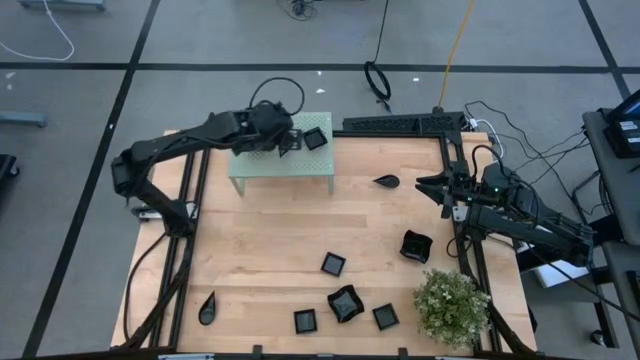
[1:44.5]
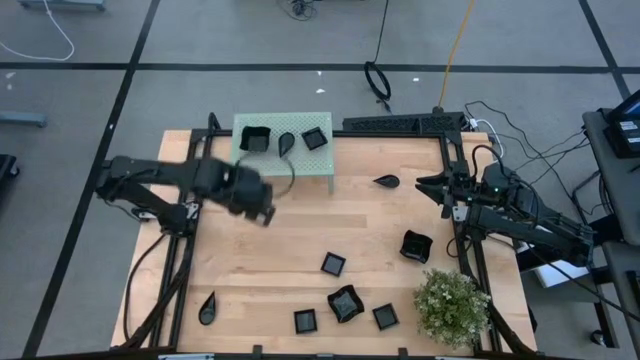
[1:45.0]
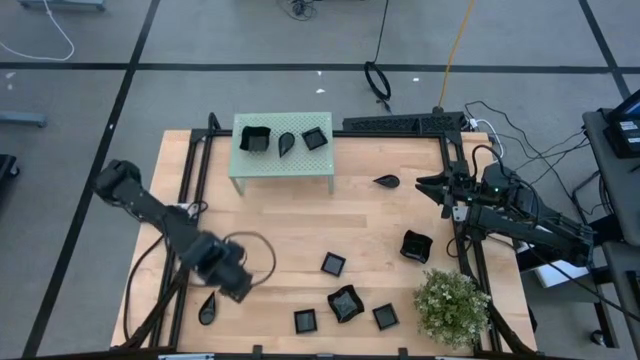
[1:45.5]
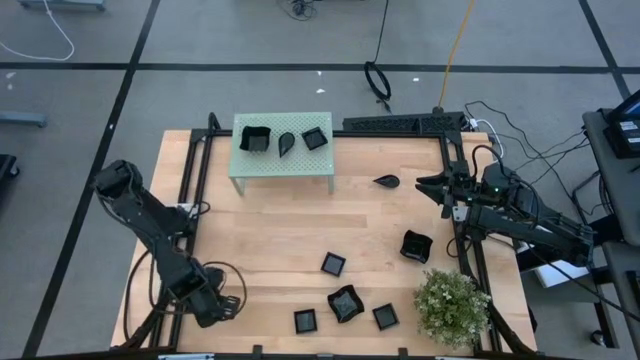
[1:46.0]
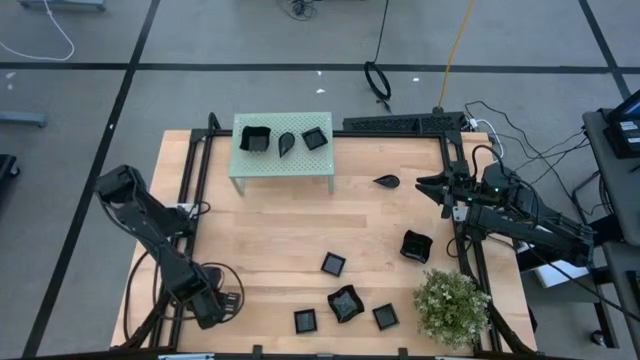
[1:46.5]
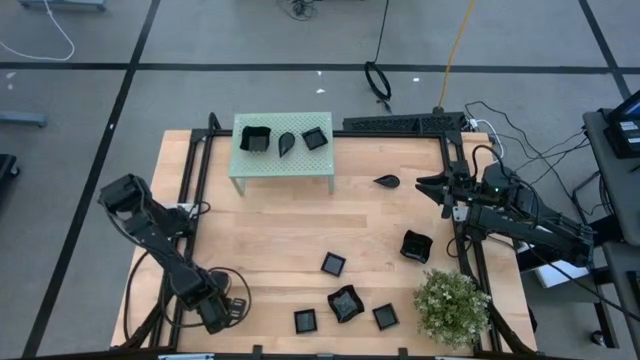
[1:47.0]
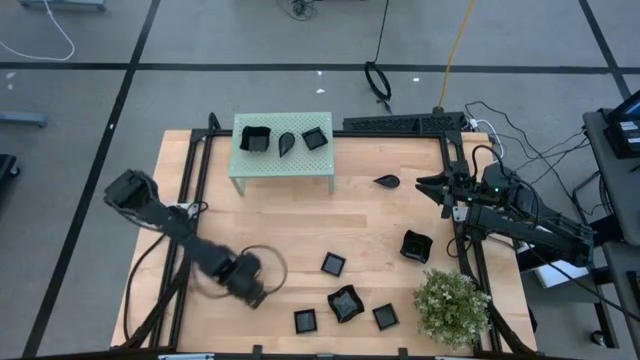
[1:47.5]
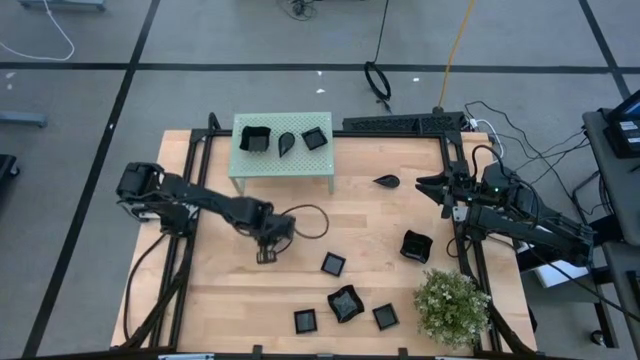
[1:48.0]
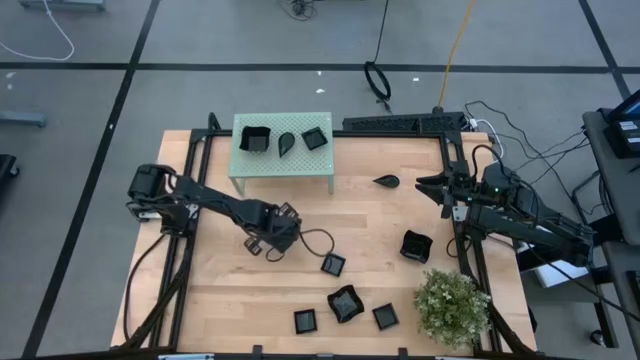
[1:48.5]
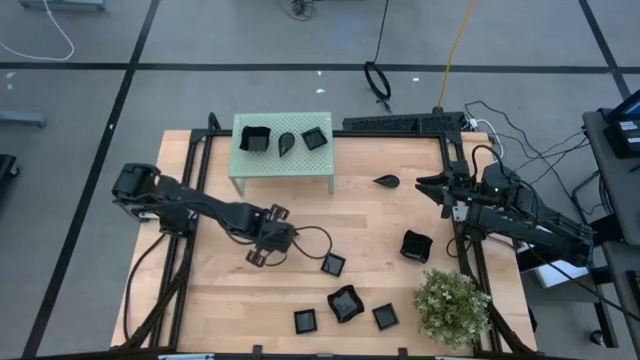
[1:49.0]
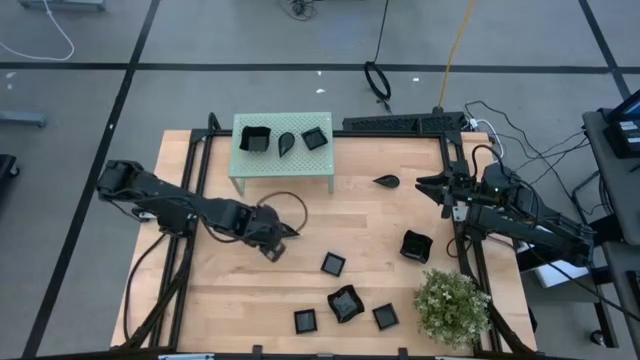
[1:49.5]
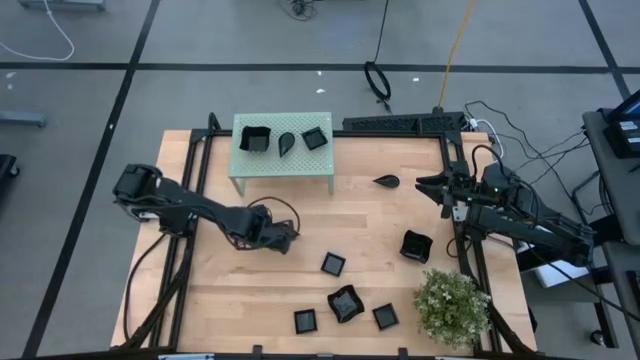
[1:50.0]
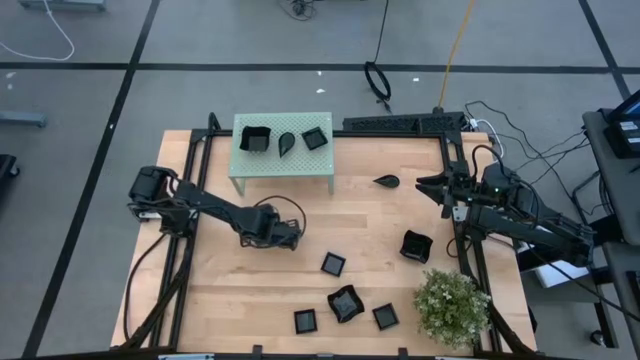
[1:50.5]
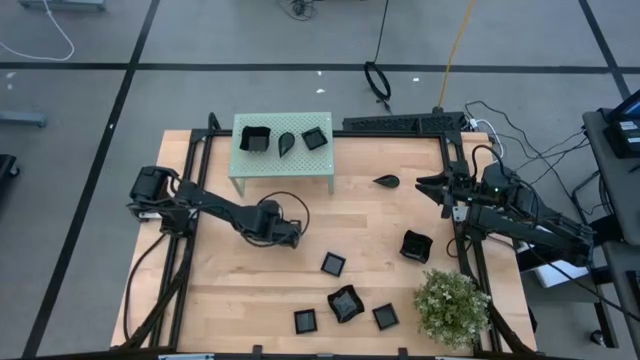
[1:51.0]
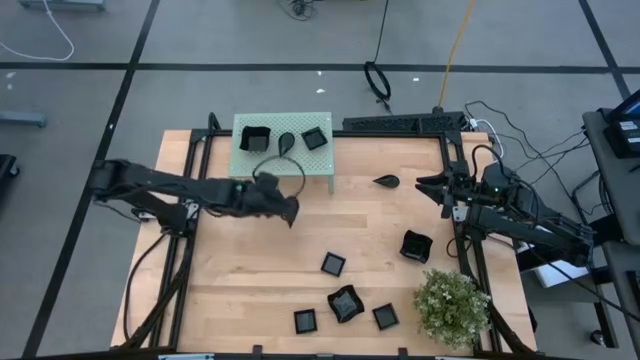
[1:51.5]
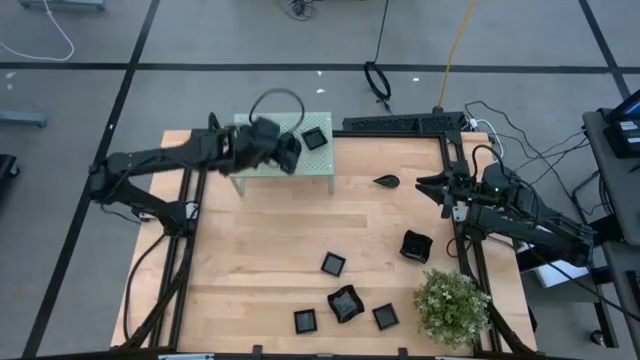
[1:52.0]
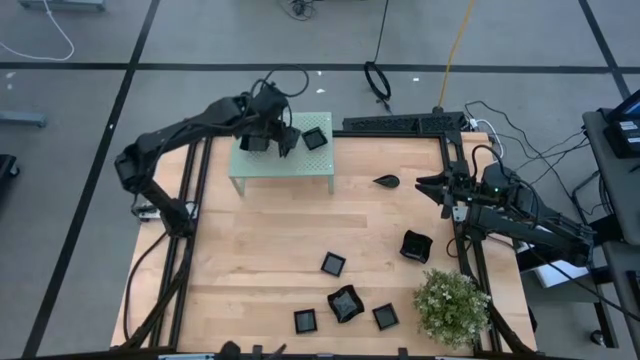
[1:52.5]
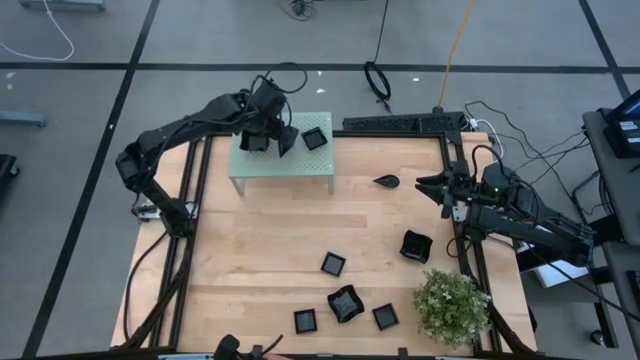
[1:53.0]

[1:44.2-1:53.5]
Task: Pick & Place Mini shaped plates
Stack the drop shaped plate on top of the stacked drop shaped plates on the shelf

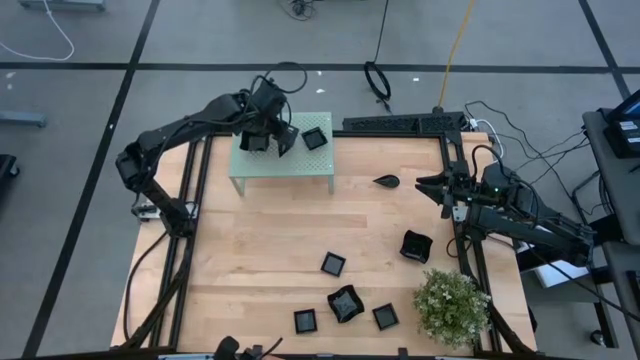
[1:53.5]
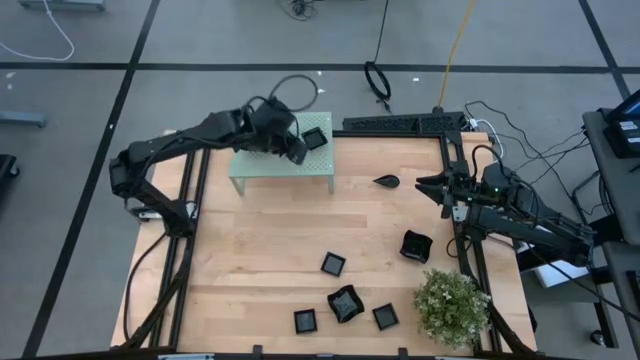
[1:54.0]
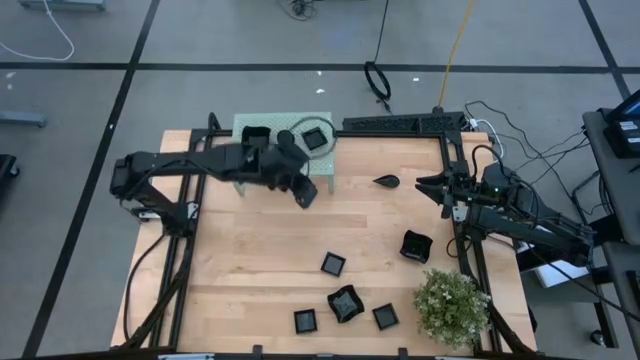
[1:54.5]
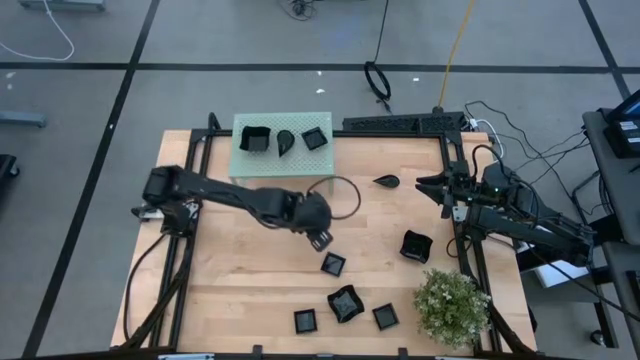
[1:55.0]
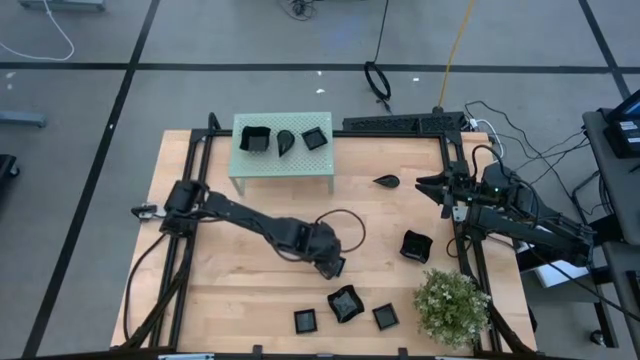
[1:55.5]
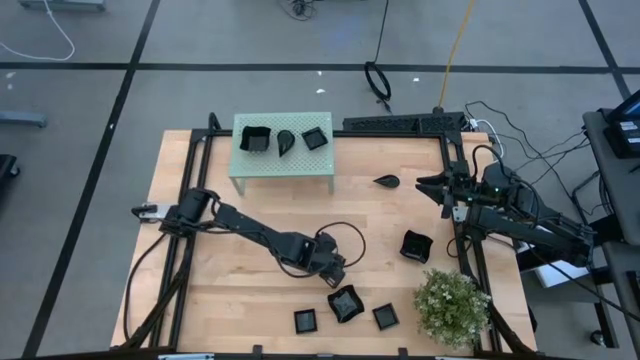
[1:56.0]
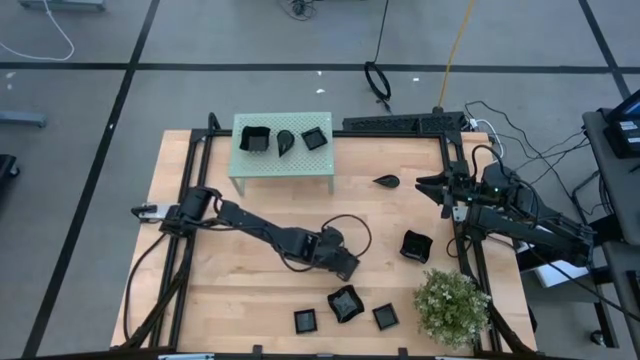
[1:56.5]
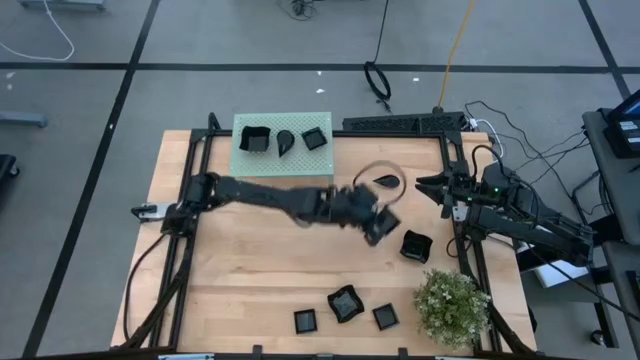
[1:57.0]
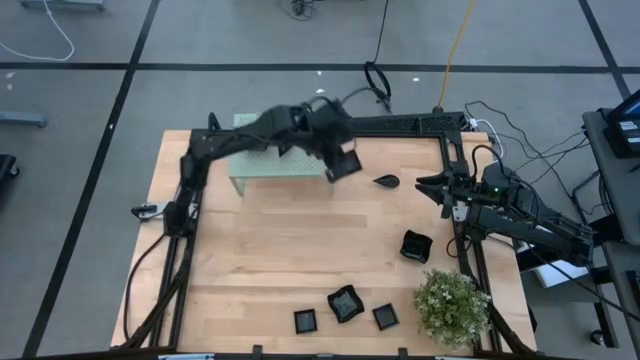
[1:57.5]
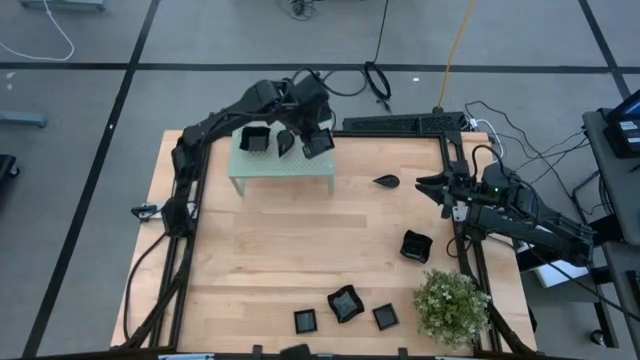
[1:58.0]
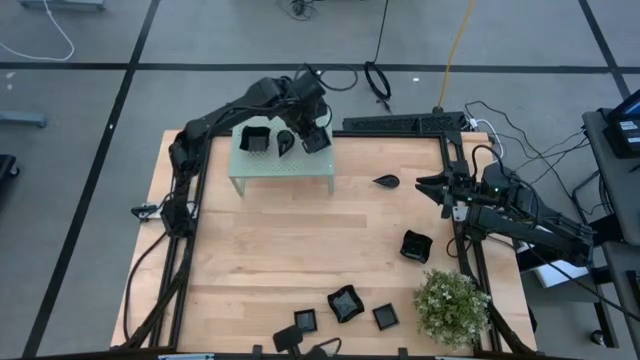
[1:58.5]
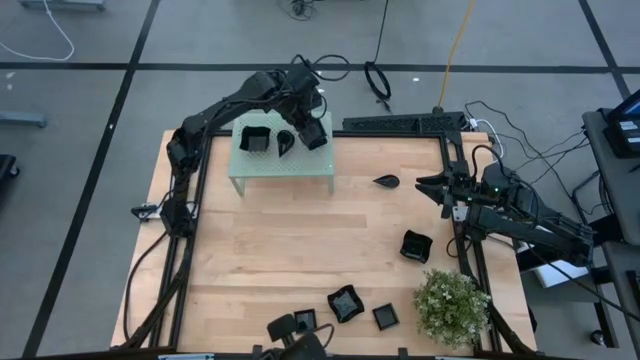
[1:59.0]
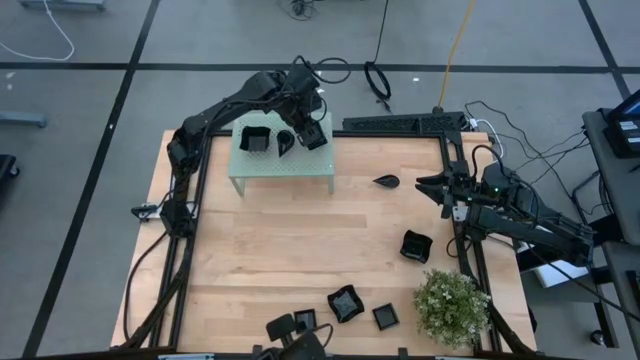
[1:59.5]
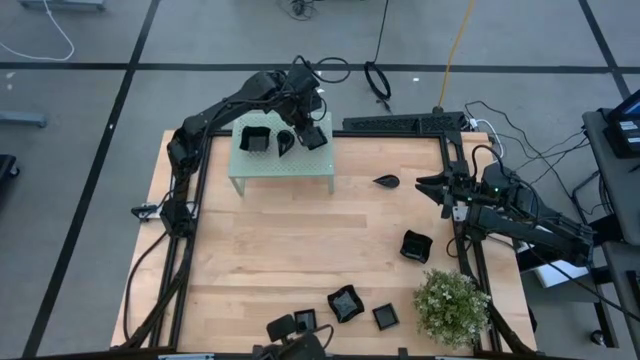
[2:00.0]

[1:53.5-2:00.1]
Stack the square plate on top of the stacked square plates on the shelf

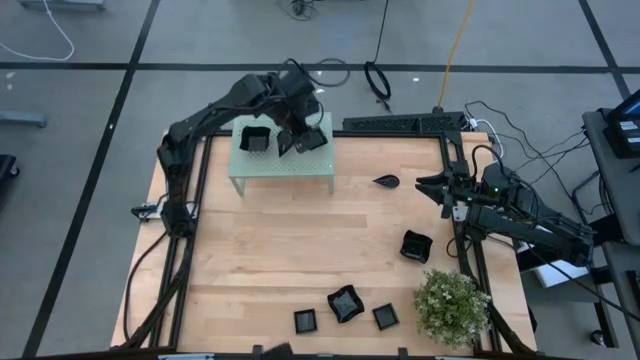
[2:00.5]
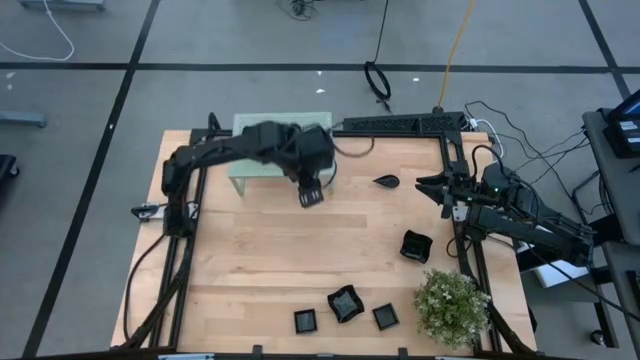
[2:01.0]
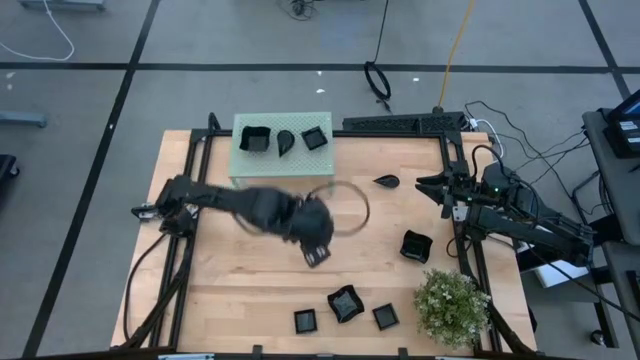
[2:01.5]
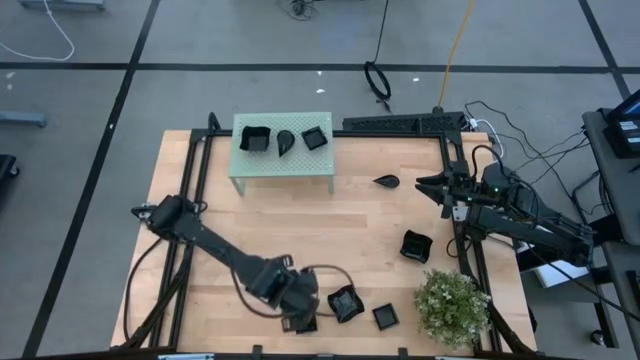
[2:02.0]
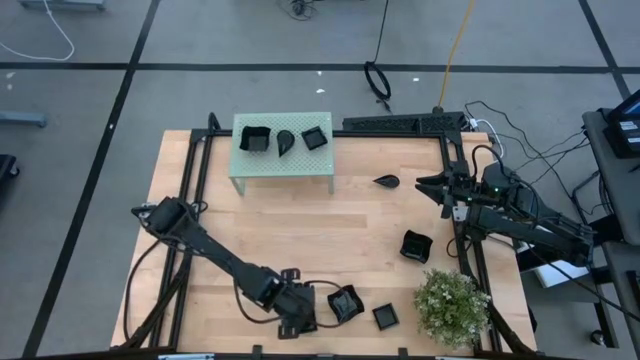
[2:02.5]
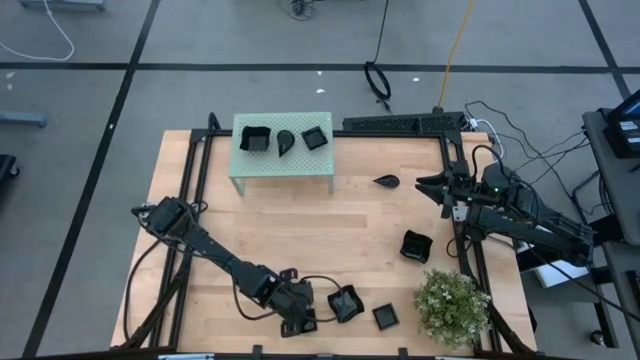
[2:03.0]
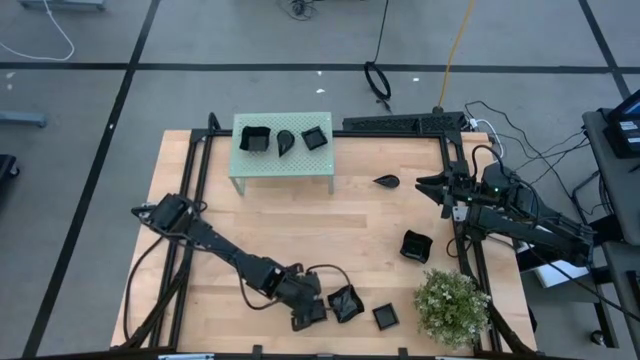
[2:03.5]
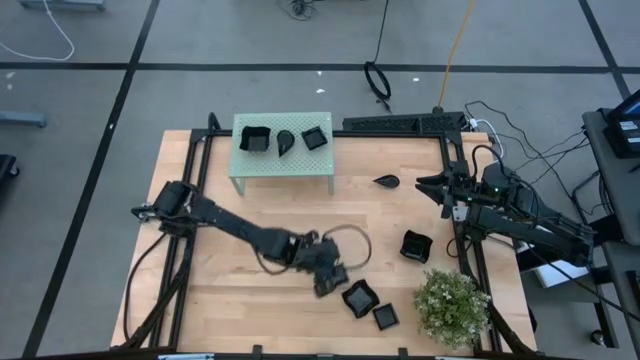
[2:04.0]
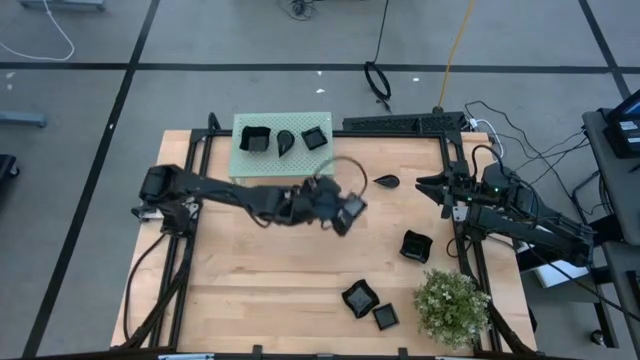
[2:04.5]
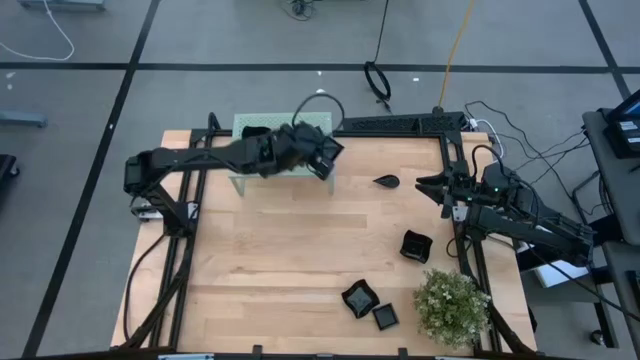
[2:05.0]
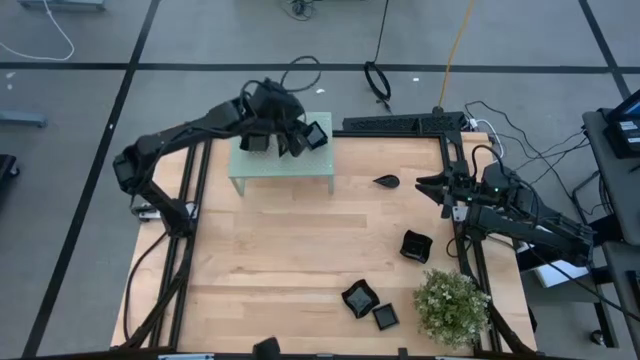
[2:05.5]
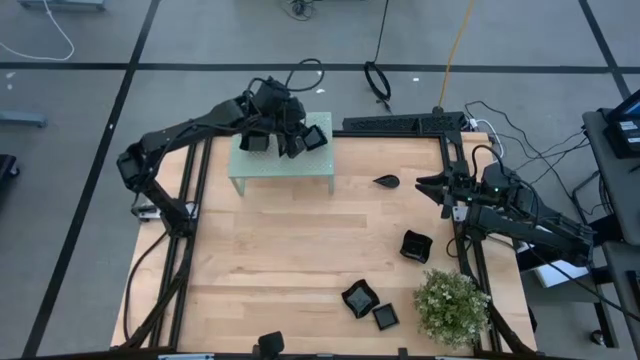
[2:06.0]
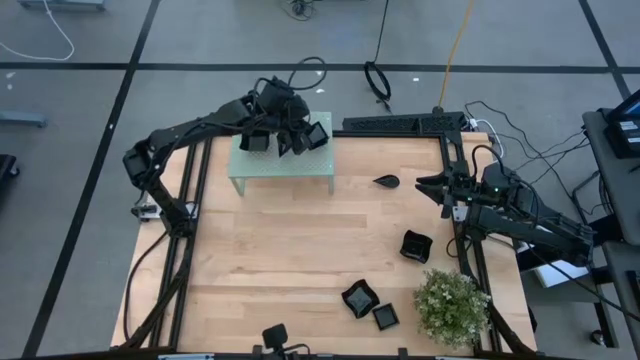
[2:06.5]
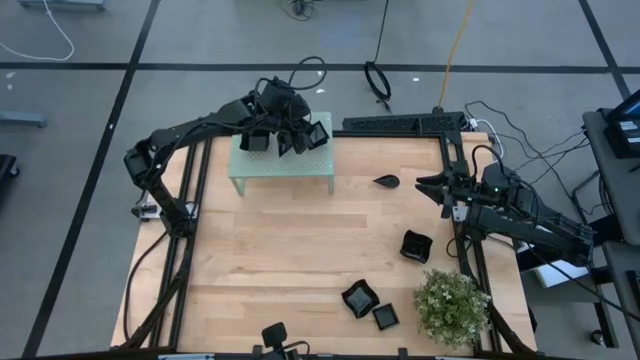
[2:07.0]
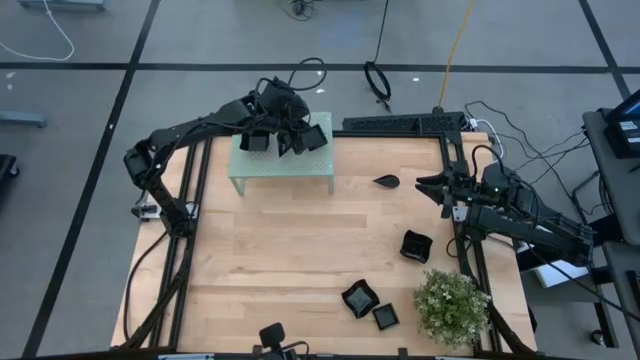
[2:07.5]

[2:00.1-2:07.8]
Stack the square plate on top of the stacked square plates on the shelf
